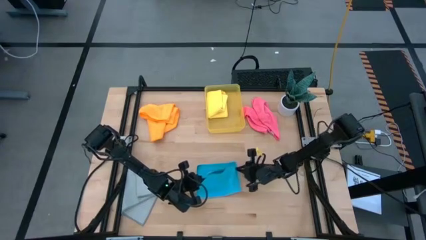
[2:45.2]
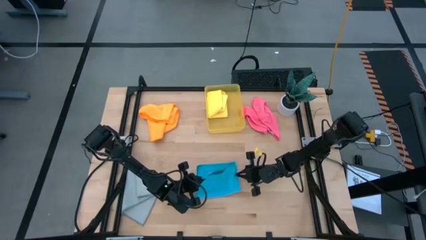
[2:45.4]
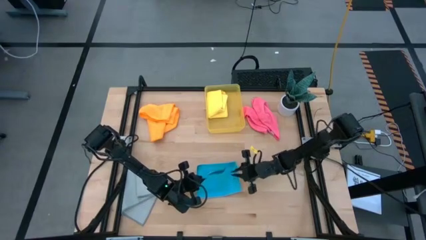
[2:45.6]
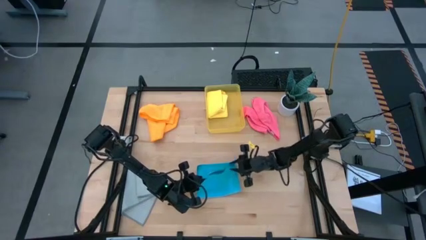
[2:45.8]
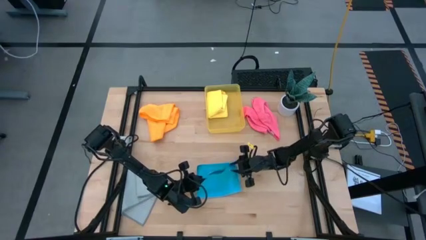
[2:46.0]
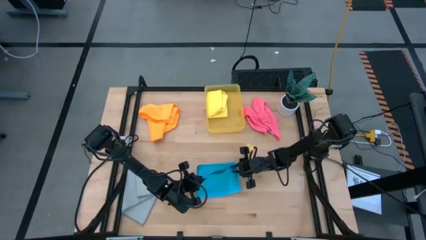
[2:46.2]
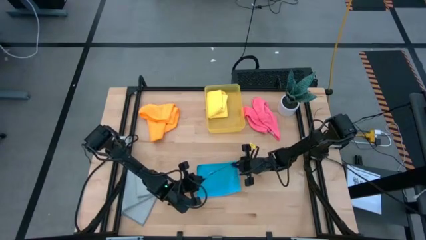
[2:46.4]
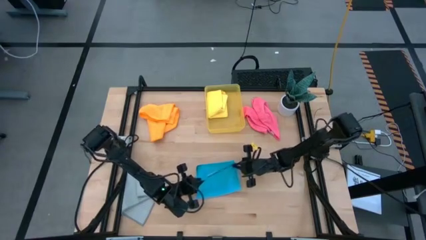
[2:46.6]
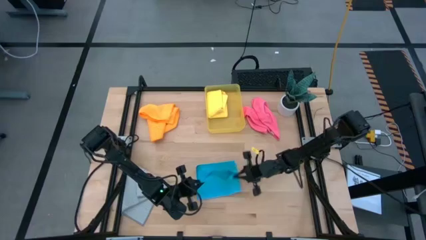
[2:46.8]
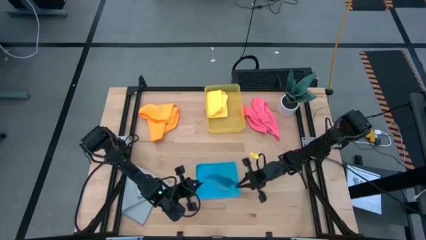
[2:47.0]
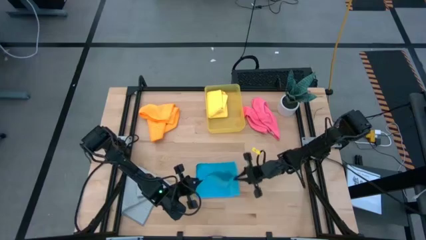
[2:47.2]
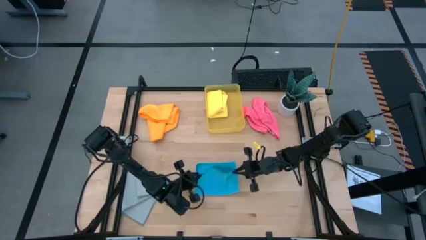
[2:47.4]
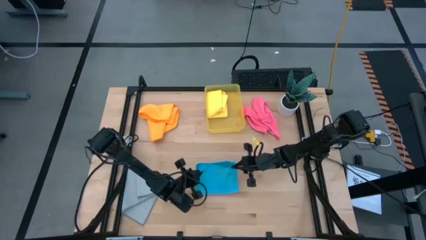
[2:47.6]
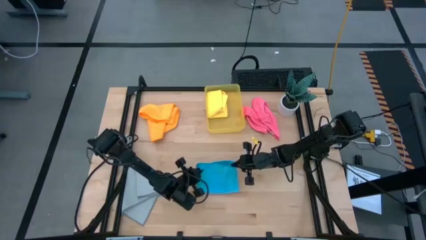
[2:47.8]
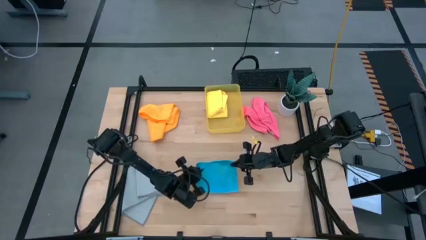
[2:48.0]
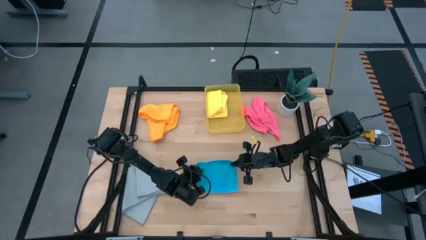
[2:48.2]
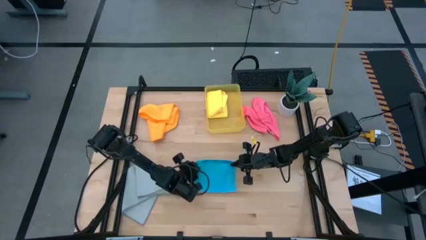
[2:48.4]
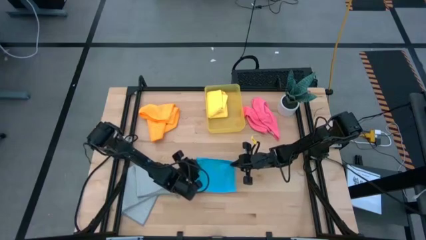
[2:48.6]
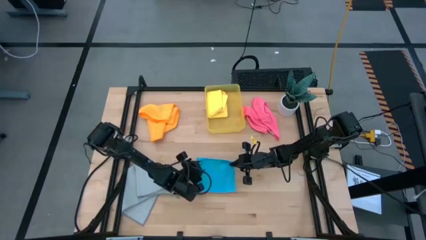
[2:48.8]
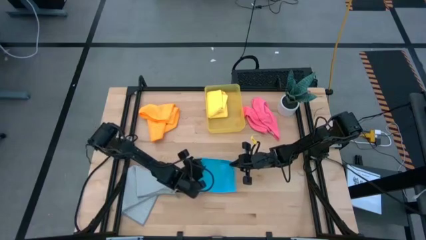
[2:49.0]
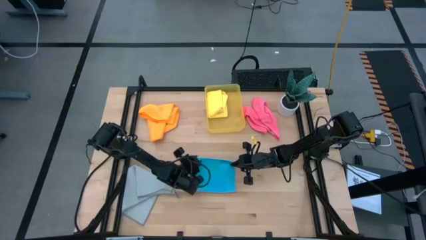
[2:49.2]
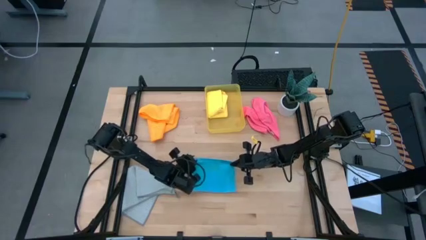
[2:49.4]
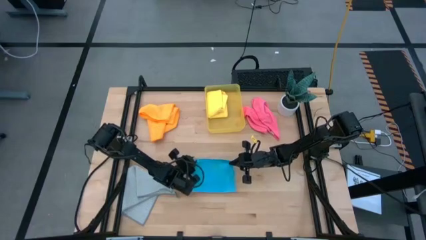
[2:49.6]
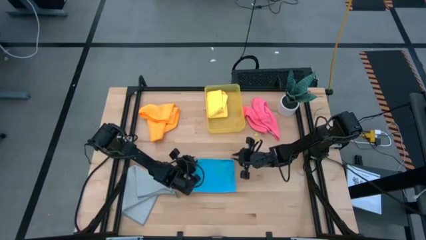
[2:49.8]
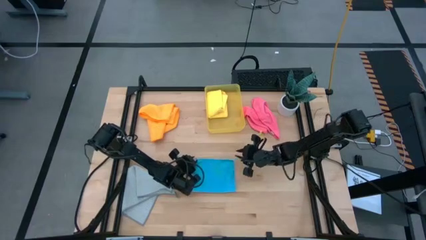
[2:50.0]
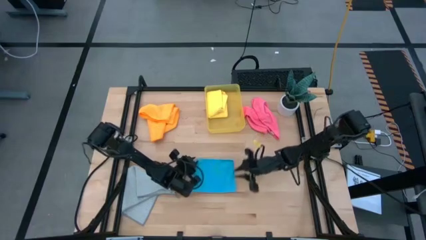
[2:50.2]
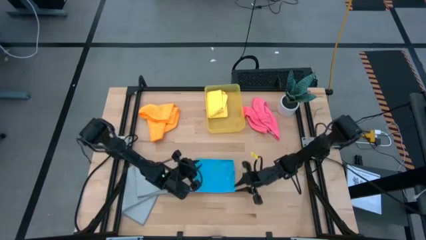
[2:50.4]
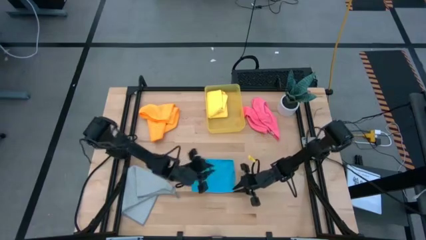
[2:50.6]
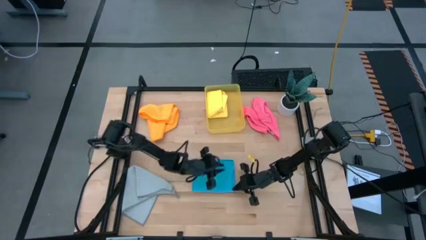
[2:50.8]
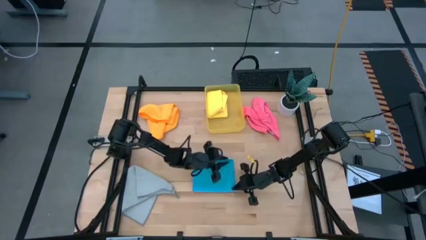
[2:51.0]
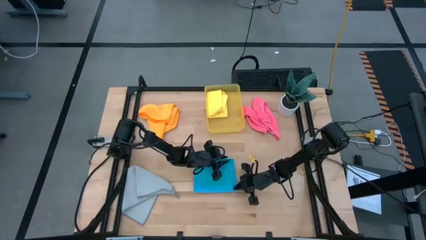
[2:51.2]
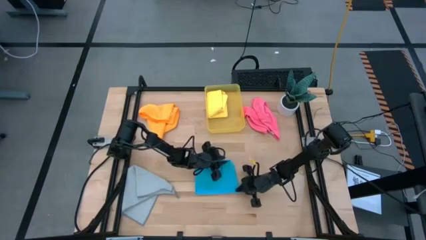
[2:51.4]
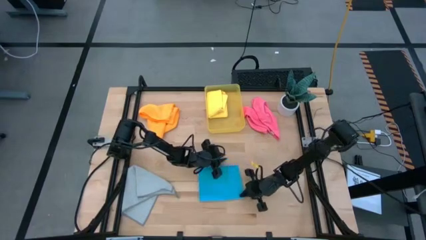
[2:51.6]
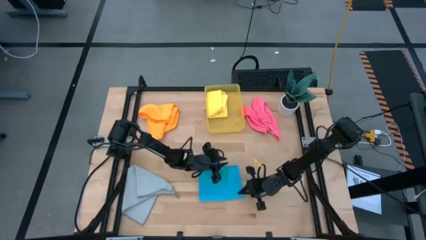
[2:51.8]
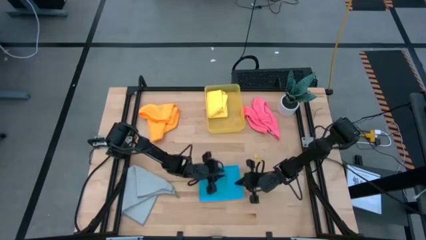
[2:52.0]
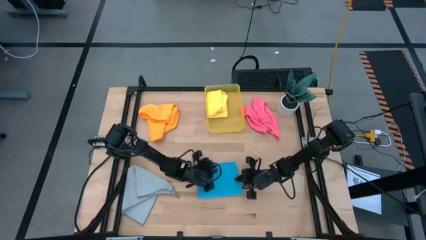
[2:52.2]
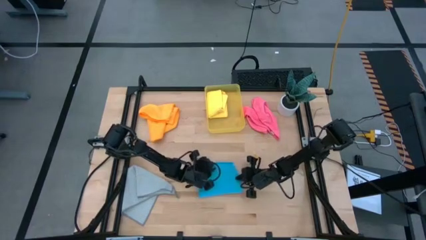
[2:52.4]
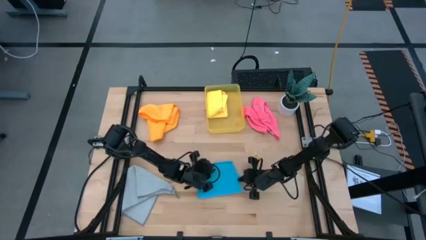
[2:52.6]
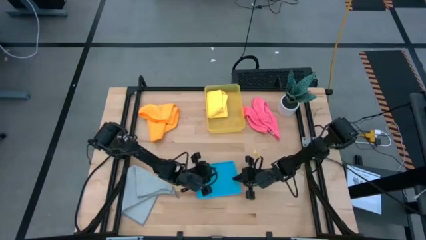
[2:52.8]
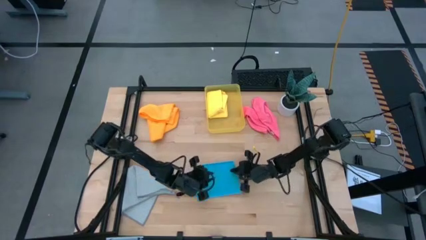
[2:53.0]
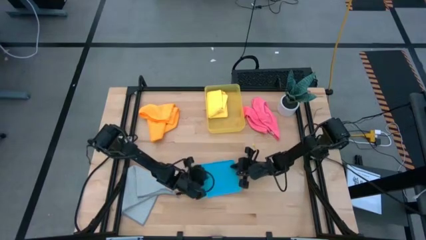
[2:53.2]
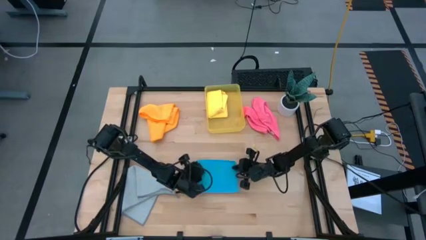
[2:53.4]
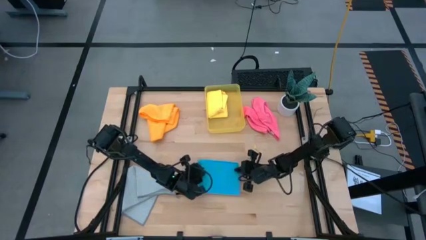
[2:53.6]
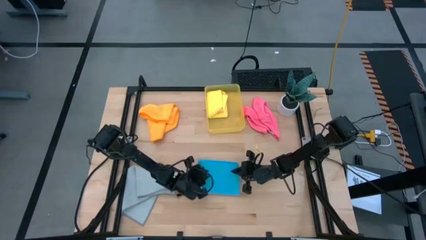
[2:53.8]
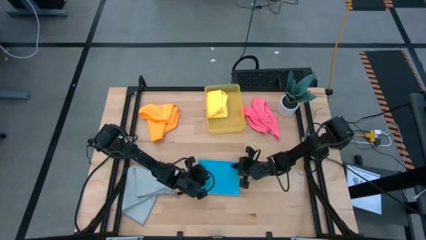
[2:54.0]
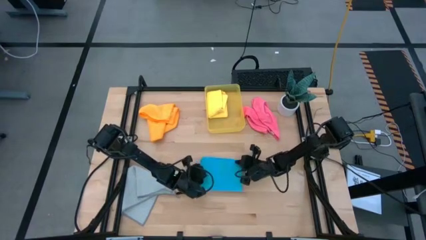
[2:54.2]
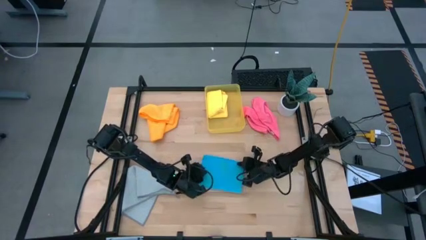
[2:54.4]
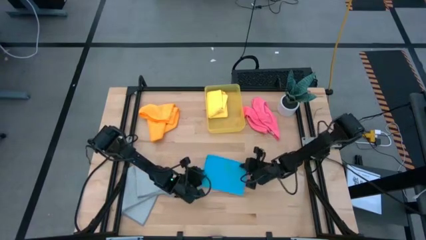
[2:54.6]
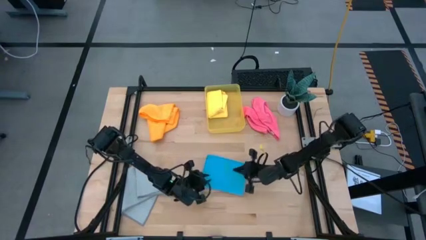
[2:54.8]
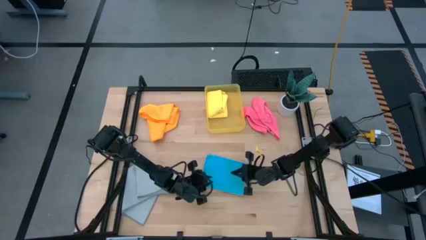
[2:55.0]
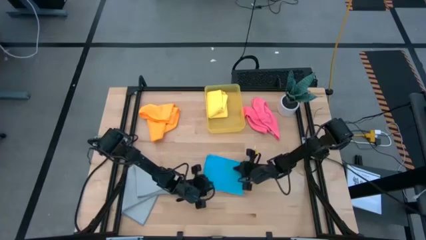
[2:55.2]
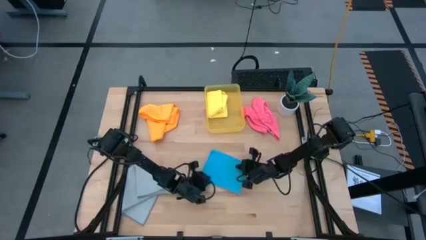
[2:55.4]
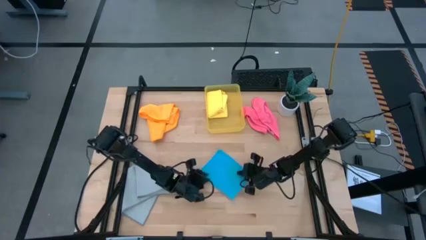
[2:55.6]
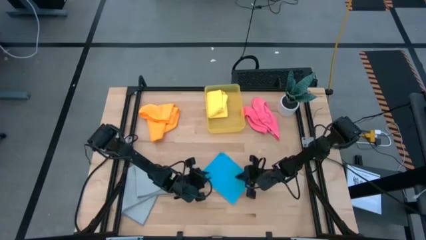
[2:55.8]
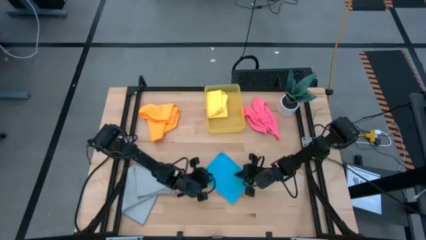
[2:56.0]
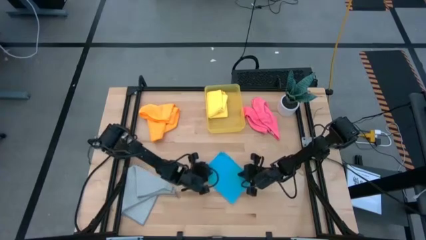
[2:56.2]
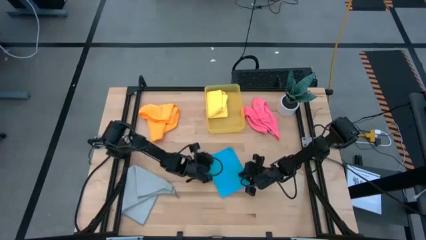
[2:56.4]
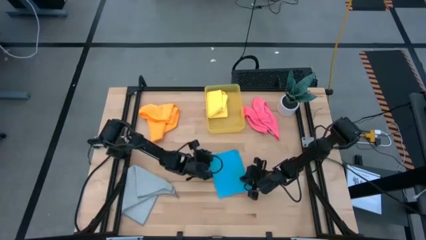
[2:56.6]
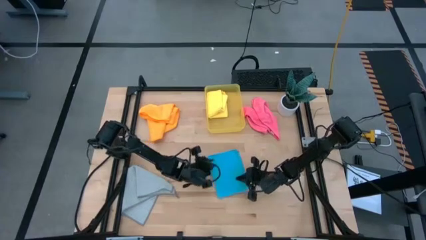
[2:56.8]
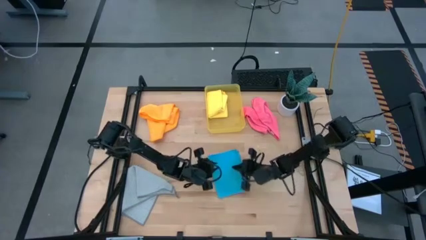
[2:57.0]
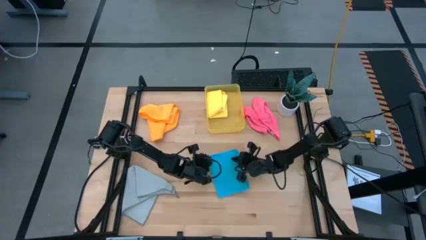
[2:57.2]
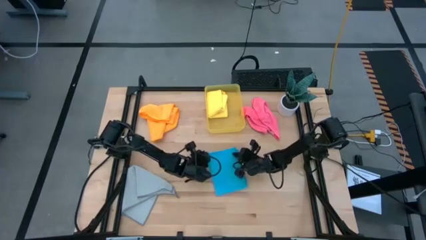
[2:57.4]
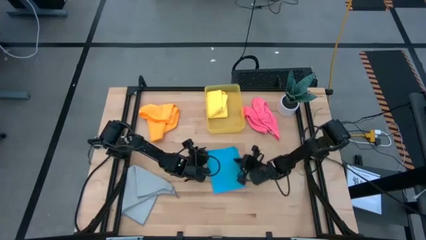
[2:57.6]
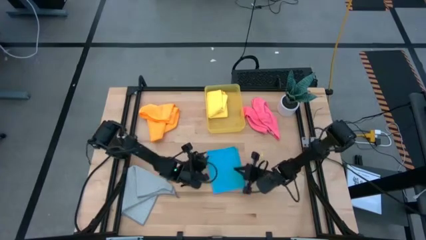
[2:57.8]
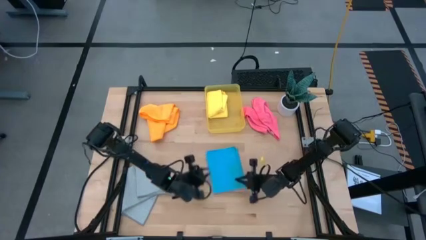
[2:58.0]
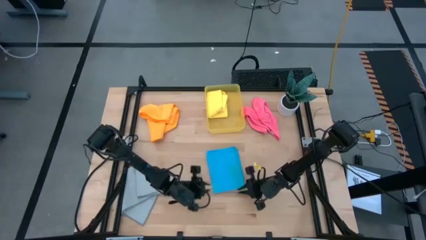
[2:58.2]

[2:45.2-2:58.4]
Task: Fold microfiber towels
Fold the blue microfiber towel

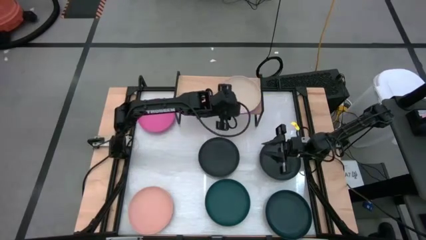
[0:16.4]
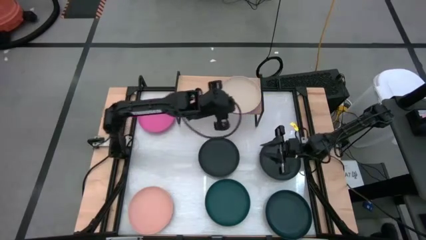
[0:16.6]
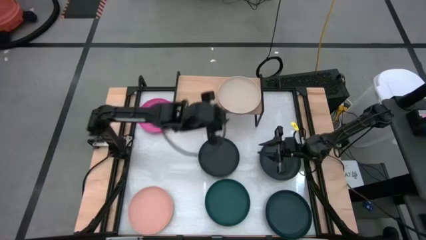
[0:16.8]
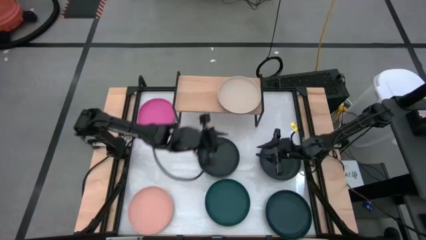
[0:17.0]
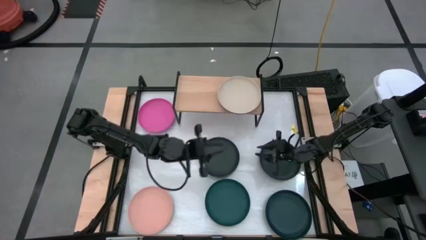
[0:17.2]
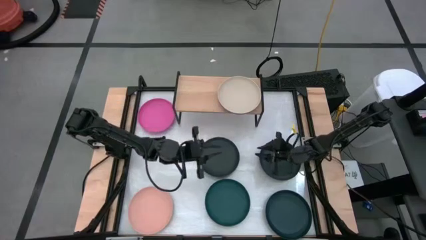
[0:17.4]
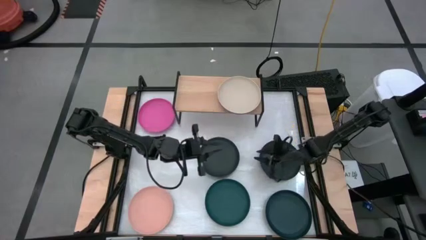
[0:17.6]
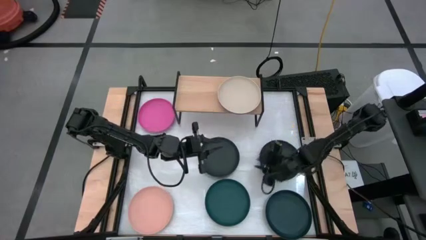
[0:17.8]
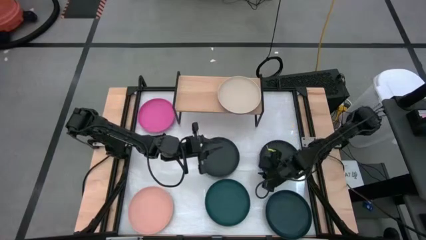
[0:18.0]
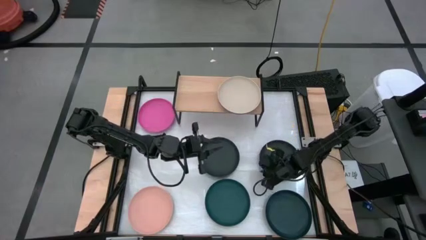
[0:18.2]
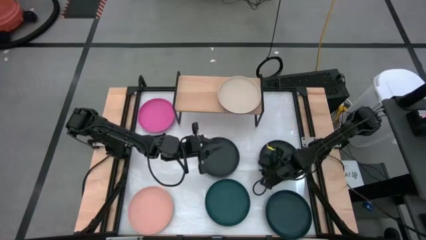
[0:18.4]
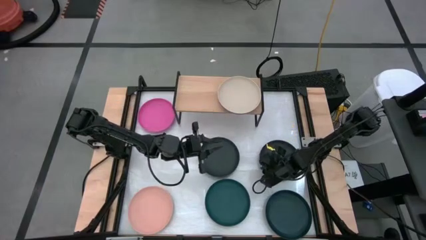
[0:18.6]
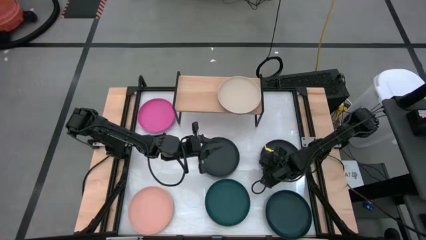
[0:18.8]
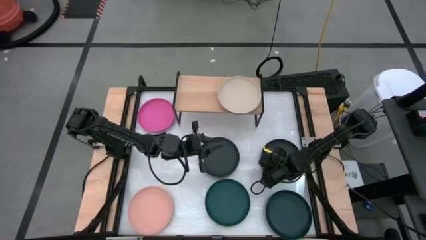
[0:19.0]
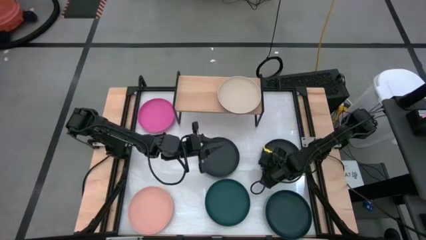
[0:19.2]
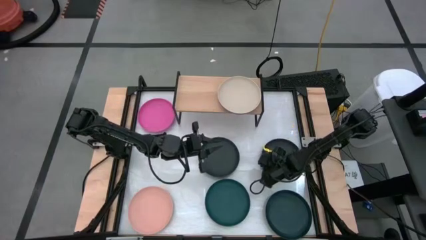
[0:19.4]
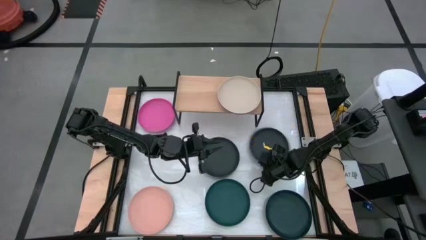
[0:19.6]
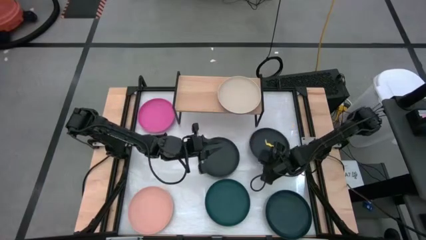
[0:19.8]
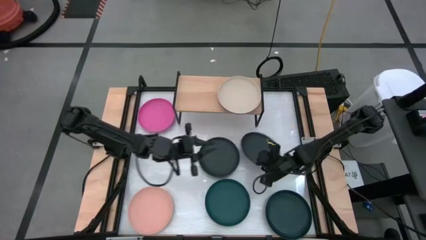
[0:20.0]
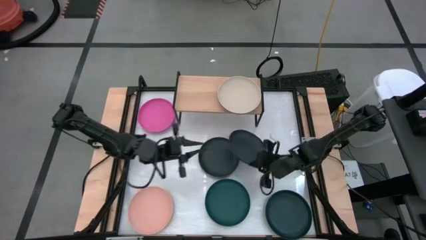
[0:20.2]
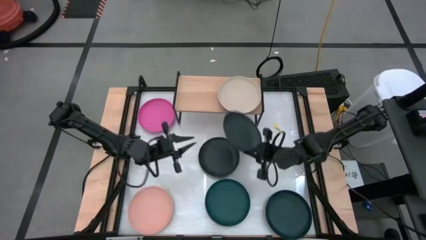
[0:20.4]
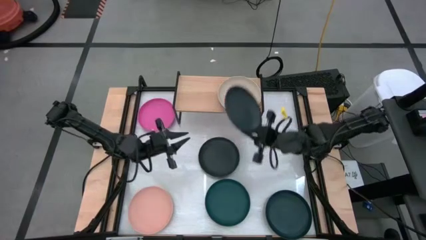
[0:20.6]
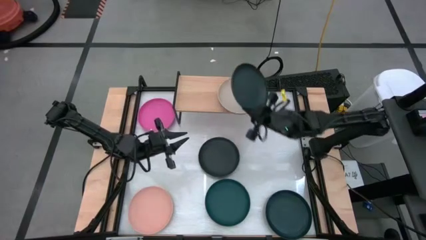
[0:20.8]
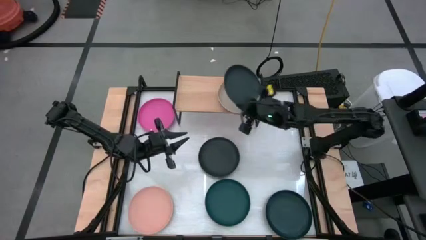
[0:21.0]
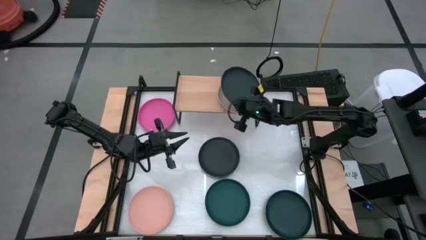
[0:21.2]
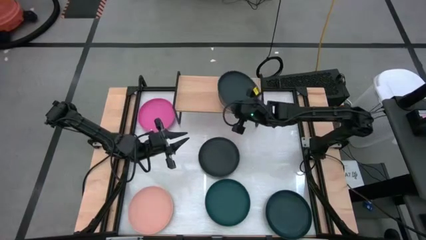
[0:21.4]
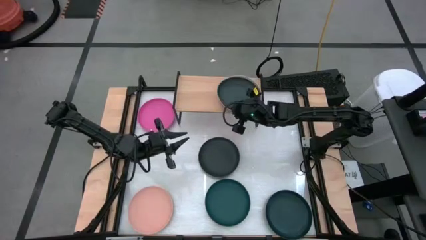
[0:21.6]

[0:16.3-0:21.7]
Task: Place and stack plates onto a shelf
Stack the right black plate on top of the gray plate on the shelf
